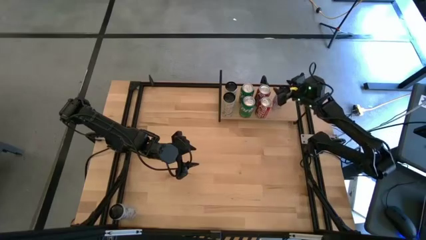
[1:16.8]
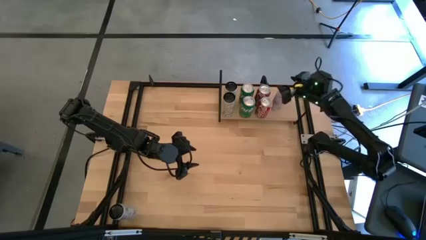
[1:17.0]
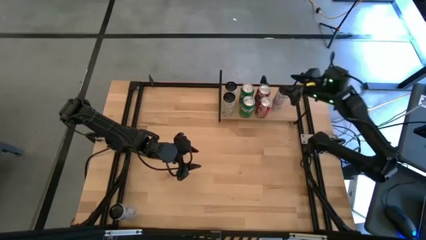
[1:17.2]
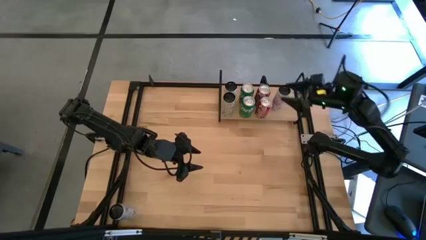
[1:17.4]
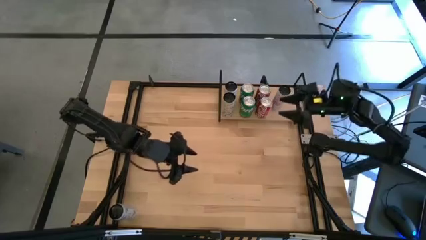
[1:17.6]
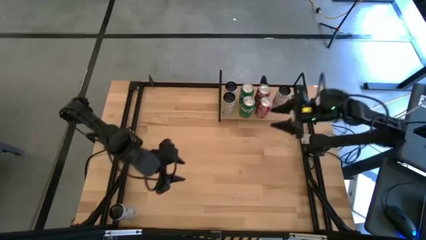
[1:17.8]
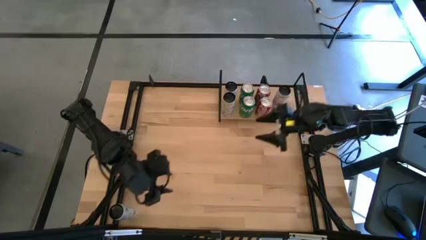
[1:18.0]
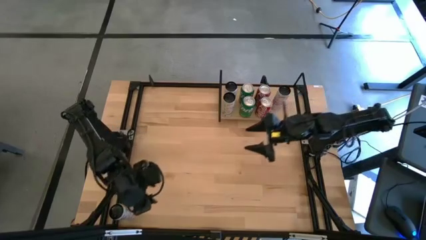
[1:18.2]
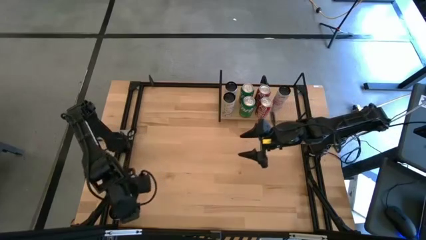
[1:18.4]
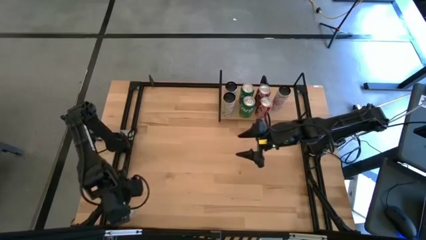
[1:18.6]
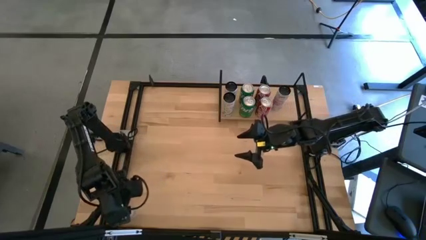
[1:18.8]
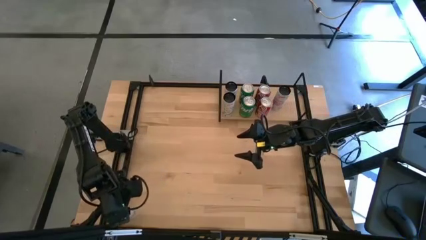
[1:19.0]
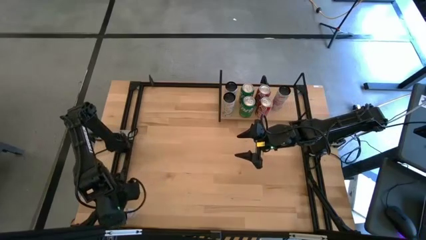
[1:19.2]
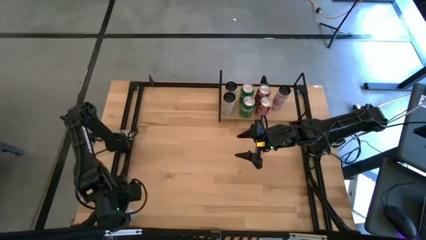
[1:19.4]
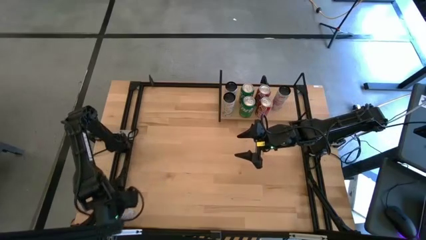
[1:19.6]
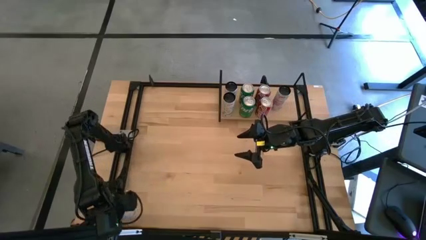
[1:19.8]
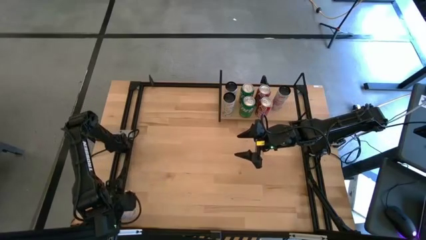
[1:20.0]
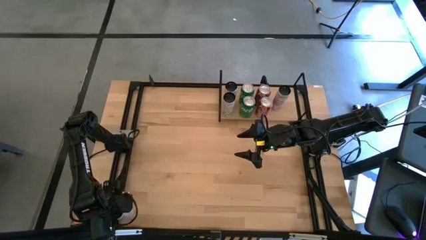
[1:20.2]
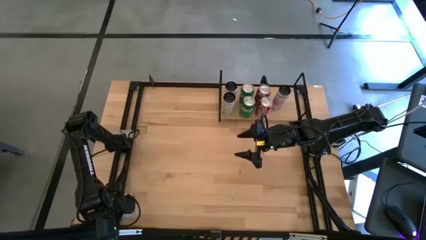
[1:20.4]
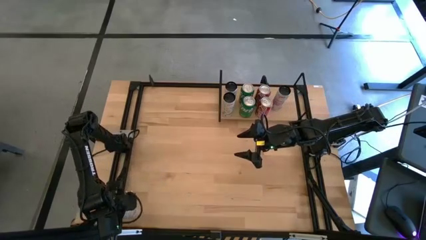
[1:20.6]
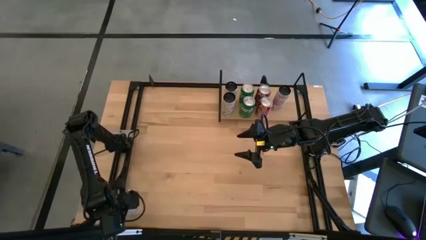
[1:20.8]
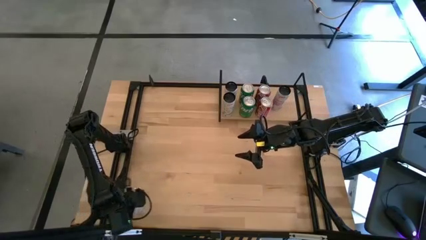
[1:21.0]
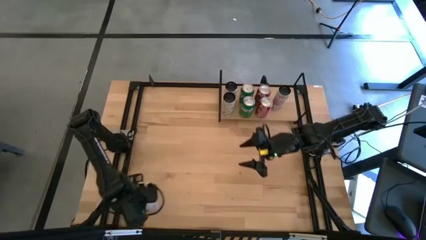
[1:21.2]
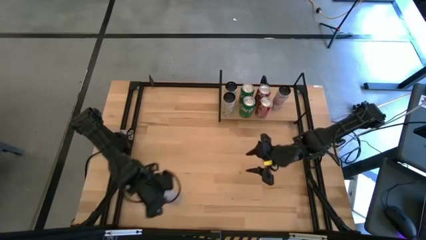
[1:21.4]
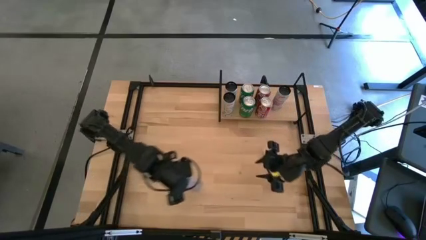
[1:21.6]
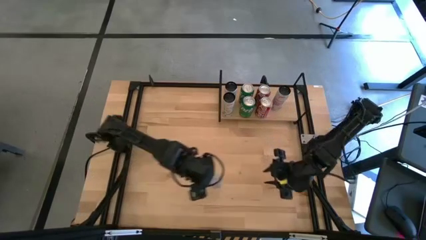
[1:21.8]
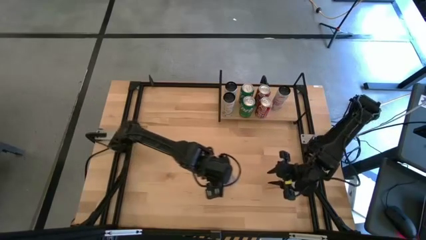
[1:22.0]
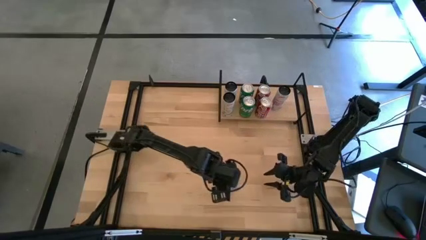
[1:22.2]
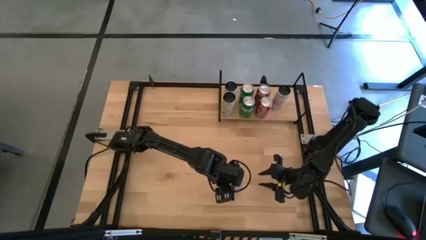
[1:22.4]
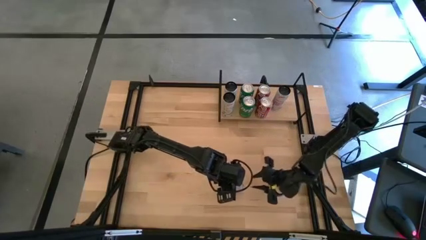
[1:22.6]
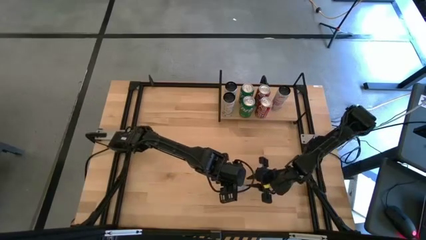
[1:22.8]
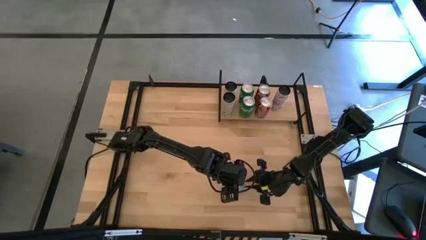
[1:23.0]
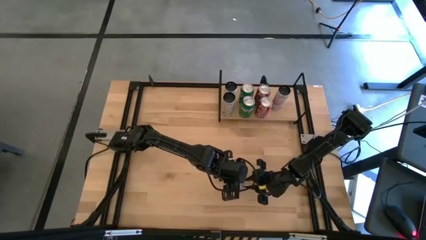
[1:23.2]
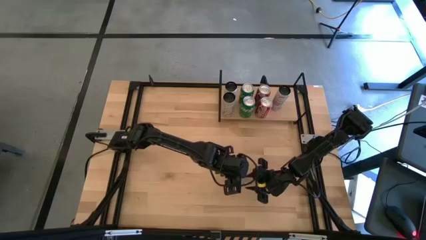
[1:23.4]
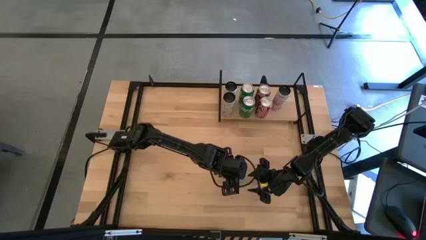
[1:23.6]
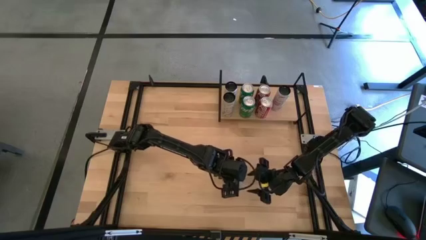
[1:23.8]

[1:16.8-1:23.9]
Task: Place canned beverage on shelf
Put the white-pink soda can on the shelf aligned with the other white-pink soda can

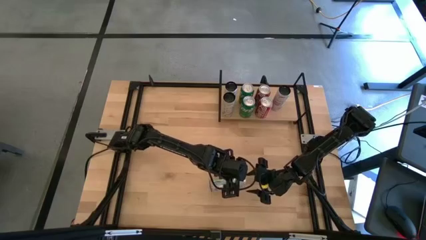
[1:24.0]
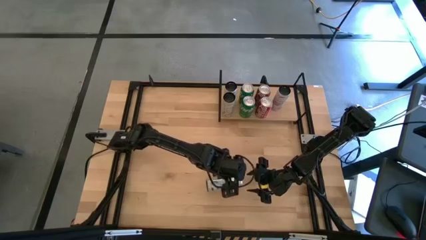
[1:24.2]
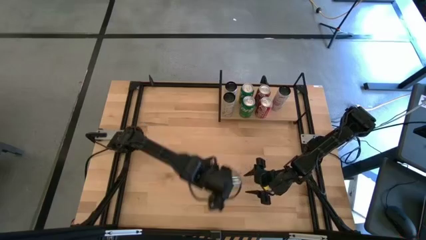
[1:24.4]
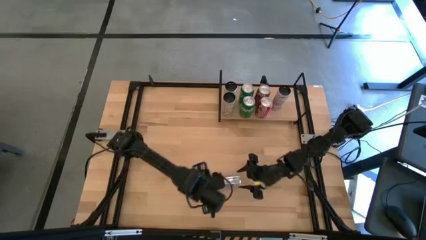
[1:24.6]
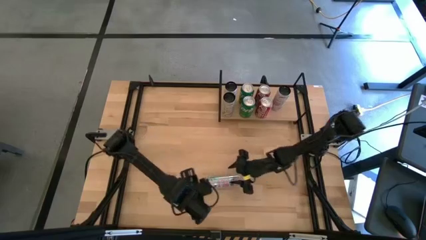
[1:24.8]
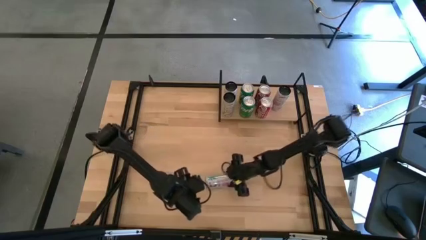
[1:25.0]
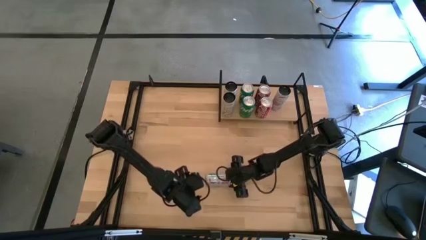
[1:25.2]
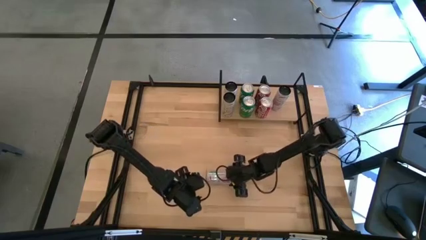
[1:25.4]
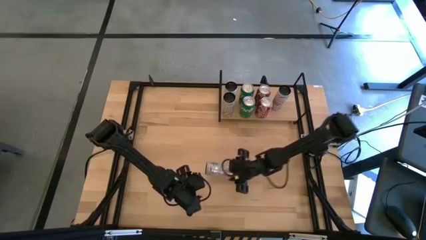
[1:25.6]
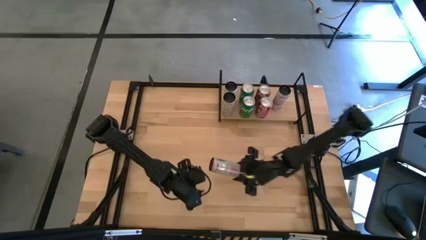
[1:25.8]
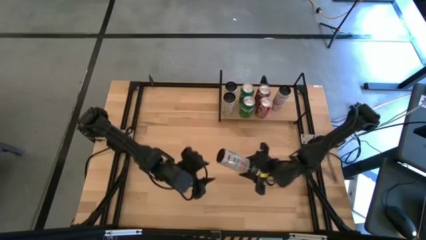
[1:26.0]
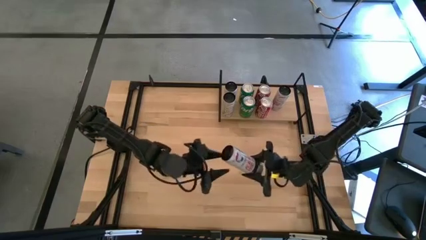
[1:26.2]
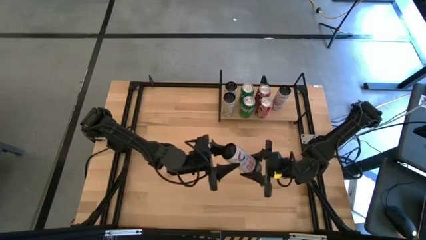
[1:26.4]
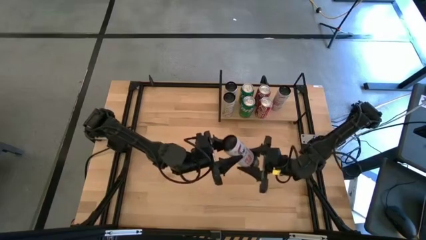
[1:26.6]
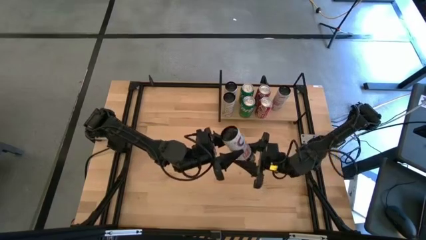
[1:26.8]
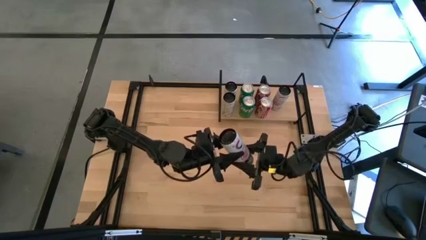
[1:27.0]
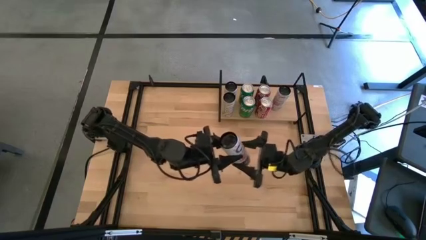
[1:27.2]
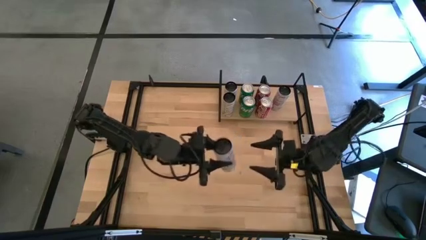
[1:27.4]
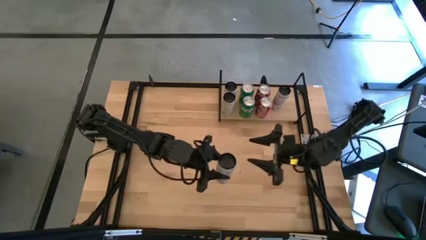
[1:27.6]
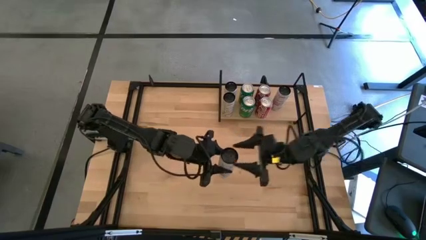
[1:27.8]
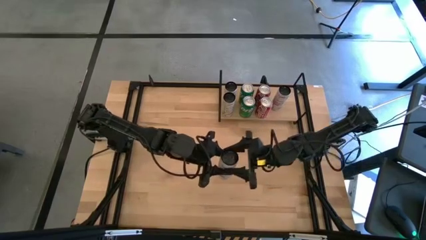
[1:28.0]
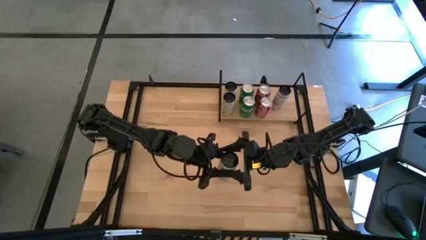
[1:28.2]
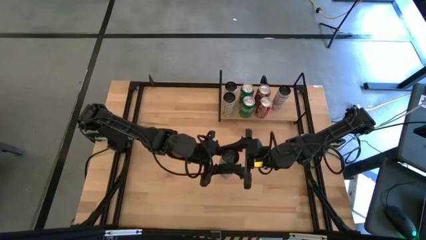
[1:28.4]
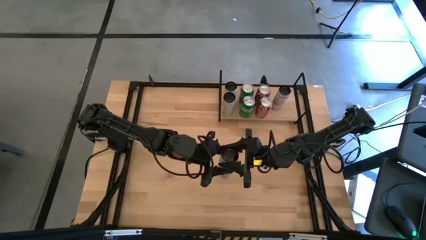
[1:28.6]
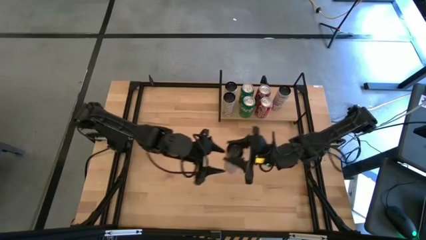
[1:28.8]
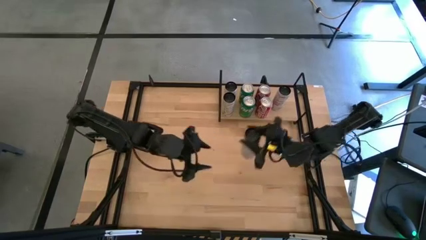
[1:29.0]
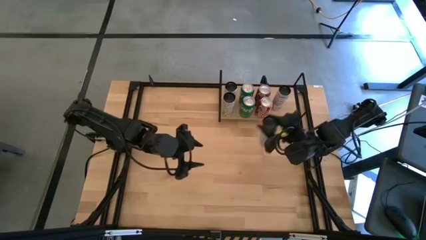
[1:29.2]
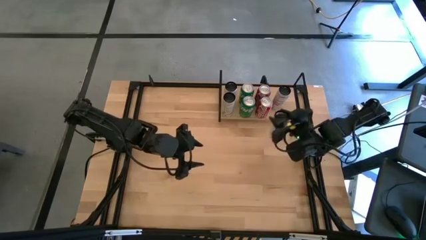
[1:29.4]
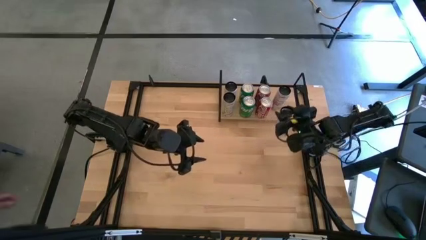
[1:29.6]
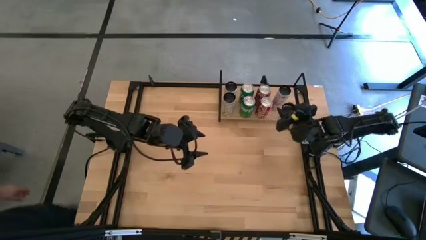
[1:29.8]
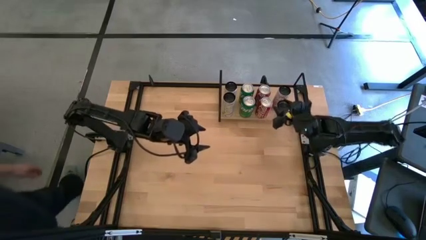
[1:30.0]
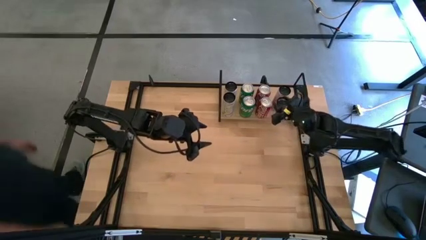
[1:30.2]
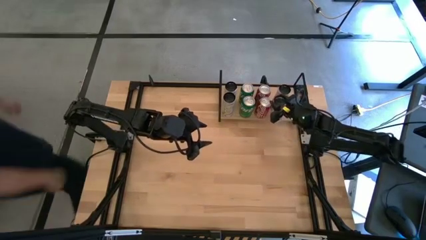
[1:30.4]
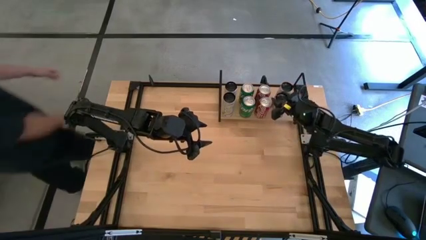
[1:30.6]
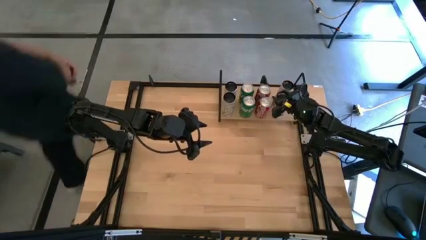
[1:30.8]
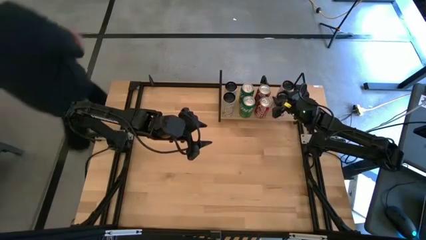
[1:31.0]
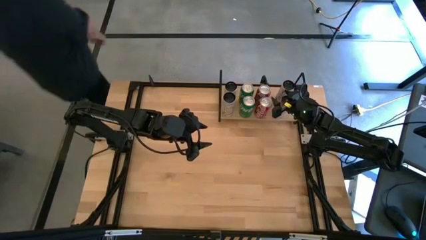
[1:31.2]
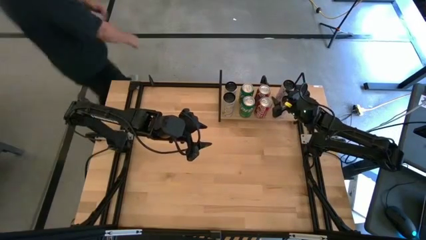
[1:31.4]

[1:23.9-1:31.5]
Put the white-pink soda can on the shelf aligned with the other white-pink soda can

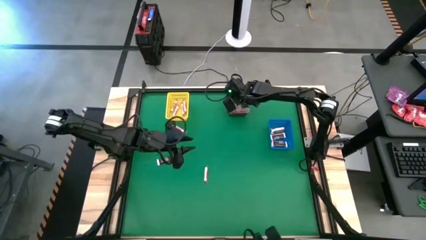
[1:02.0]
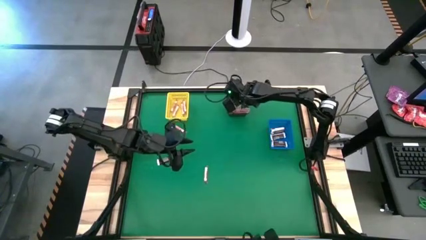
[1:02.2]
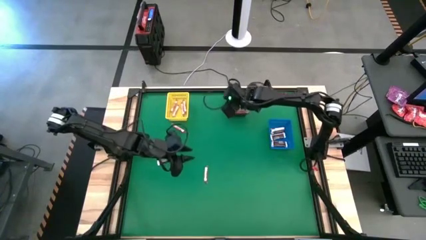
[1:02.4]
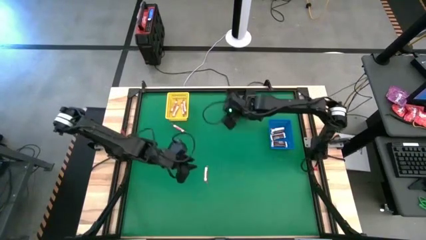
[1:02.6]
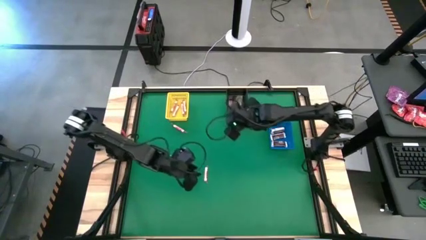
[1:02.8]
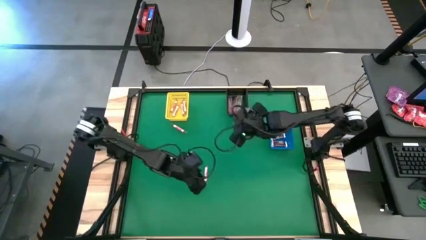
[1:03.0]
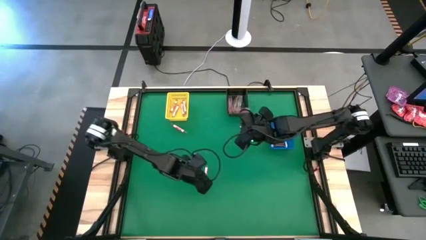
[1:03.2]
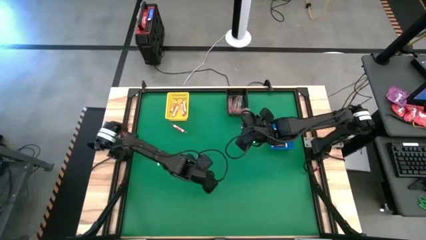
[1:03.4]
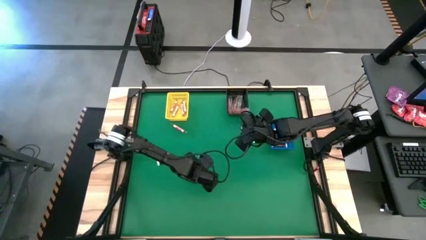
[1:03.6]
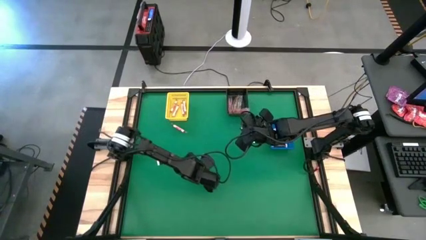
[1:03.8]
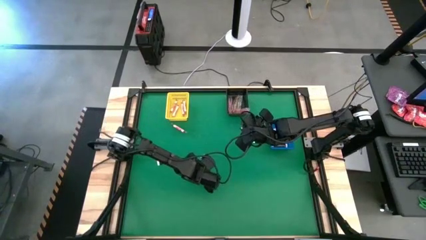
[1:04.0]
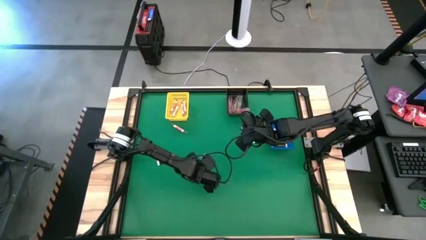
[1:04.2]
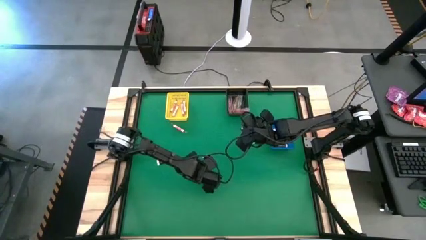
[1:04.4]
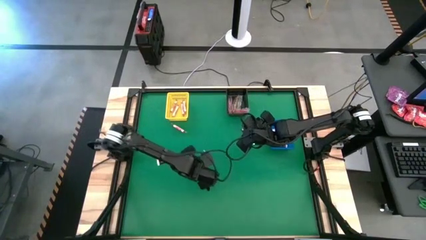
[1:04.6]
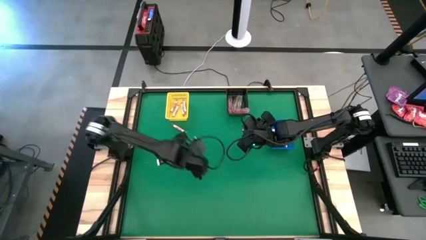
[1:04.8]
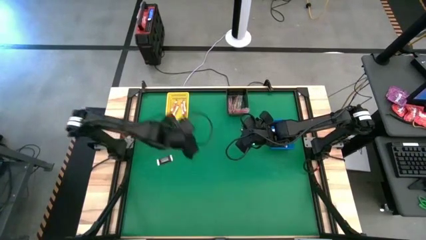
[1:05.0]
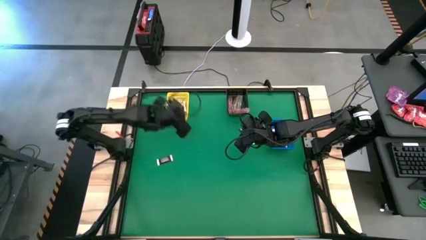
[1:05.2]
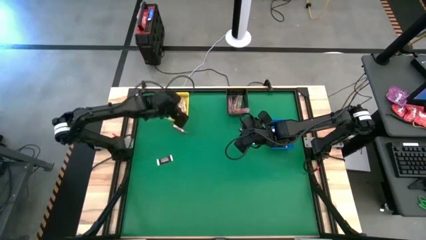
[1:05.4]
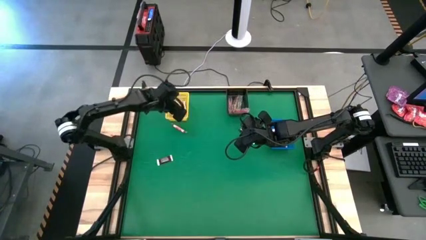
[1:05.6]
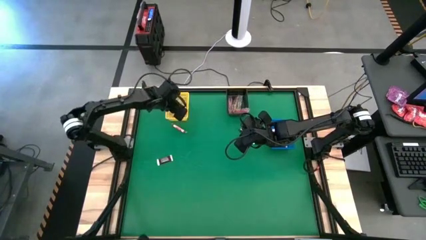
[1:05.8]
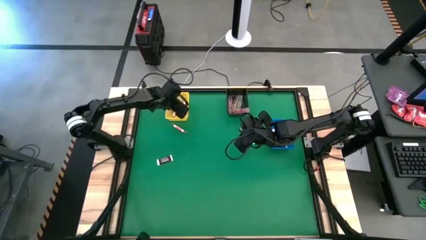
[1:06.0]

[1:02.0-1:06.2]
Task: Sort candy by brand, put in halloween buckets
Put the pink candy into the yellow basket
